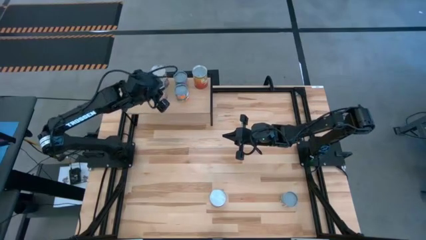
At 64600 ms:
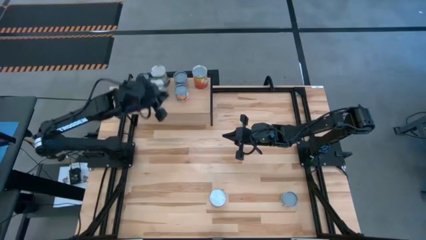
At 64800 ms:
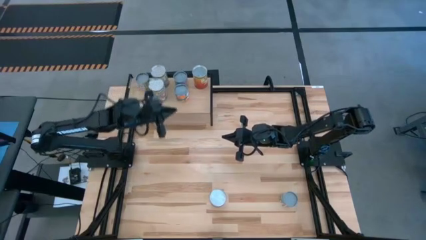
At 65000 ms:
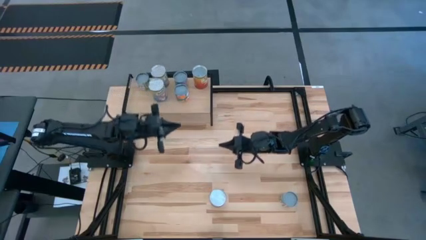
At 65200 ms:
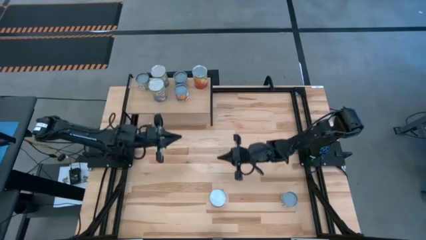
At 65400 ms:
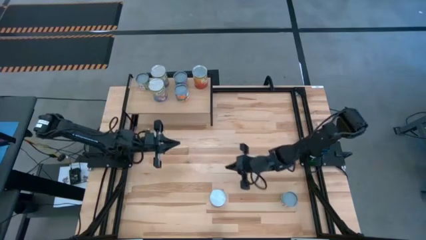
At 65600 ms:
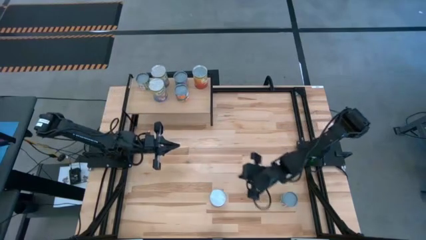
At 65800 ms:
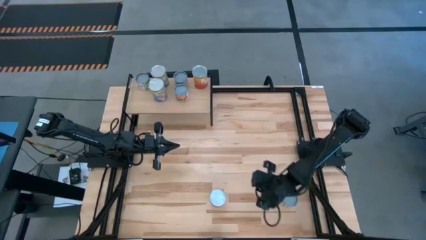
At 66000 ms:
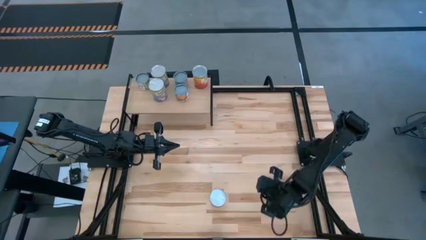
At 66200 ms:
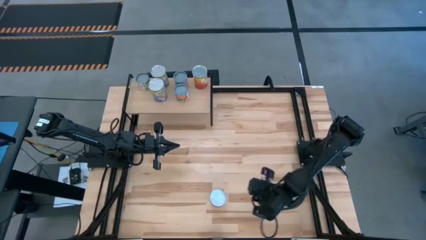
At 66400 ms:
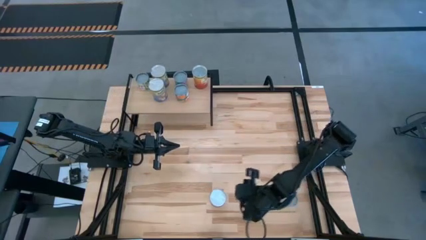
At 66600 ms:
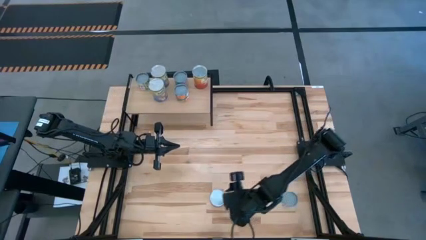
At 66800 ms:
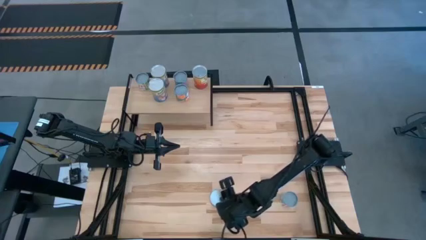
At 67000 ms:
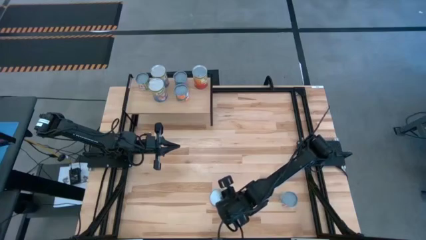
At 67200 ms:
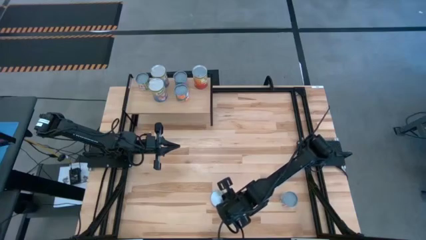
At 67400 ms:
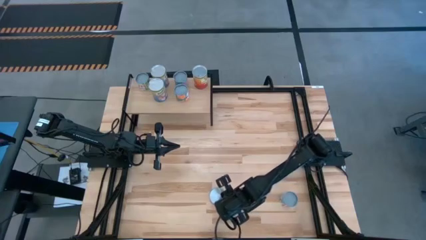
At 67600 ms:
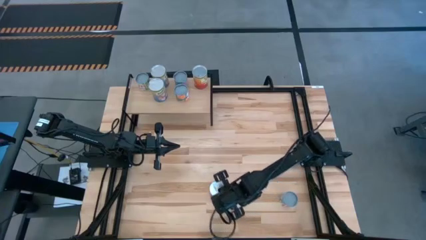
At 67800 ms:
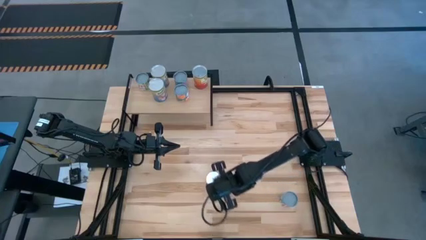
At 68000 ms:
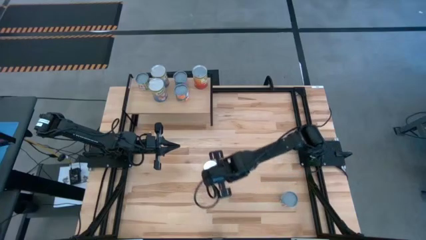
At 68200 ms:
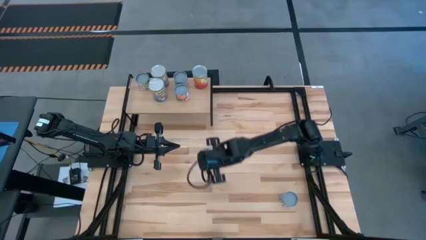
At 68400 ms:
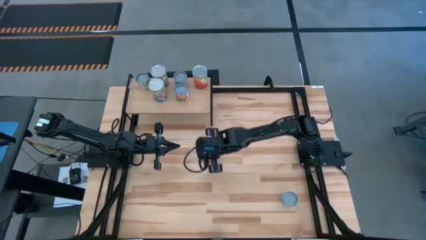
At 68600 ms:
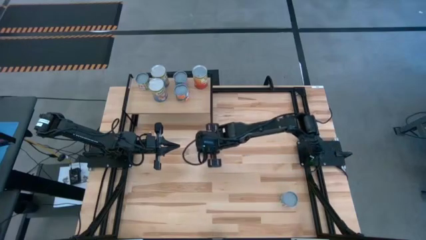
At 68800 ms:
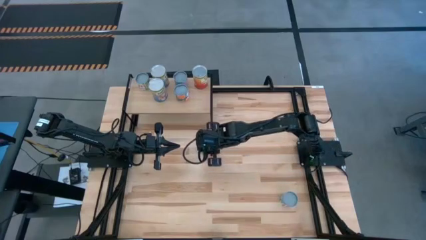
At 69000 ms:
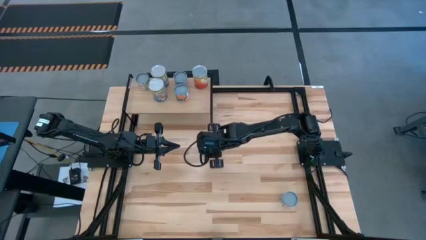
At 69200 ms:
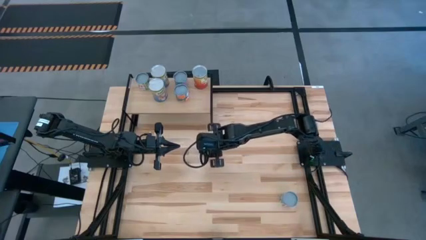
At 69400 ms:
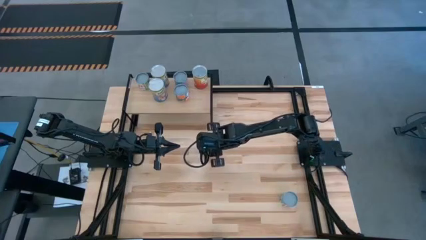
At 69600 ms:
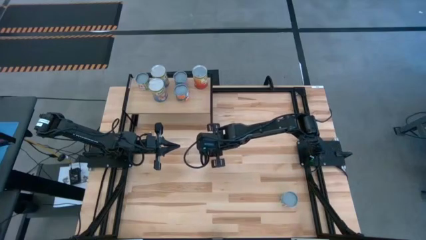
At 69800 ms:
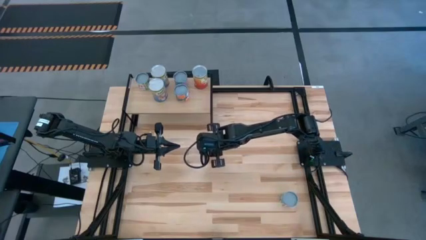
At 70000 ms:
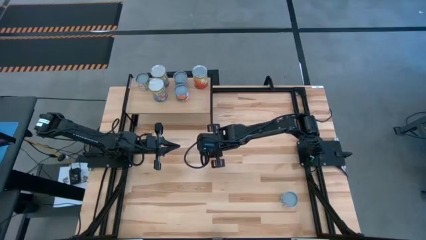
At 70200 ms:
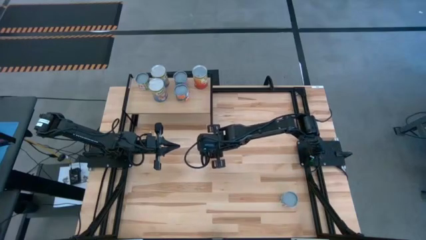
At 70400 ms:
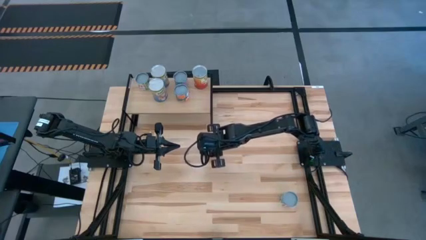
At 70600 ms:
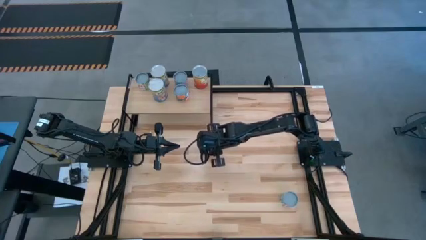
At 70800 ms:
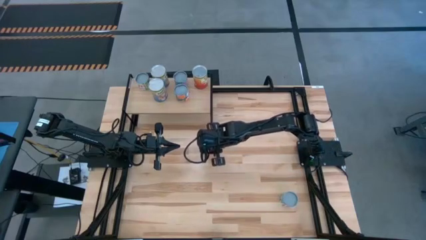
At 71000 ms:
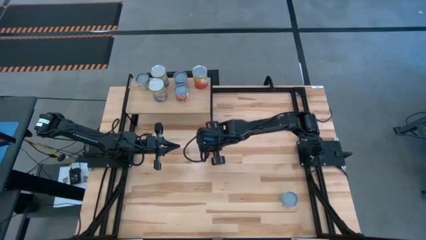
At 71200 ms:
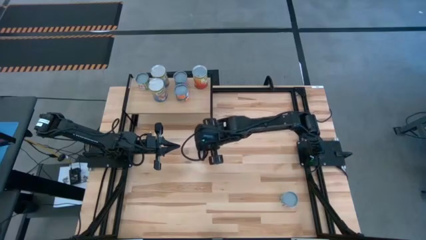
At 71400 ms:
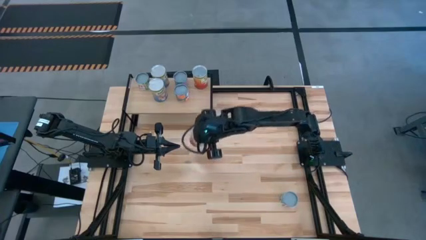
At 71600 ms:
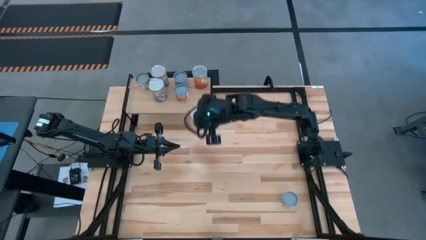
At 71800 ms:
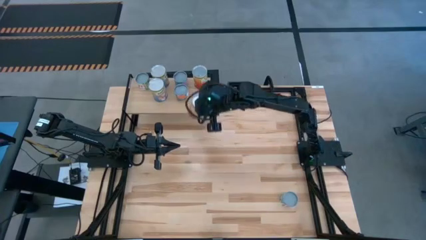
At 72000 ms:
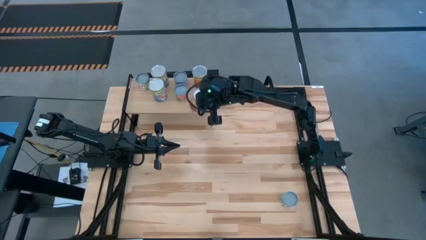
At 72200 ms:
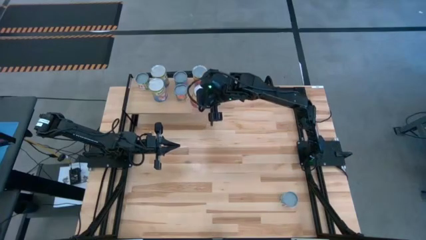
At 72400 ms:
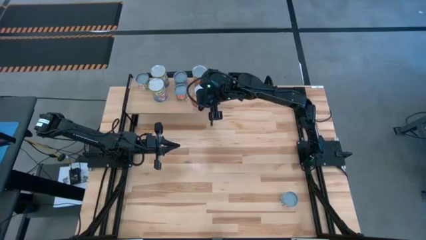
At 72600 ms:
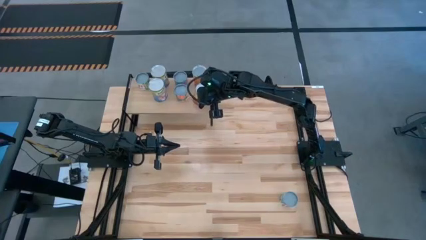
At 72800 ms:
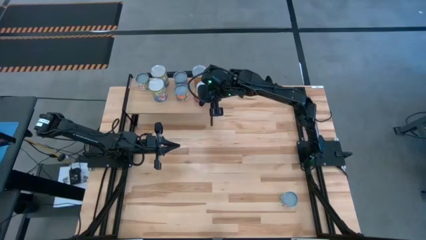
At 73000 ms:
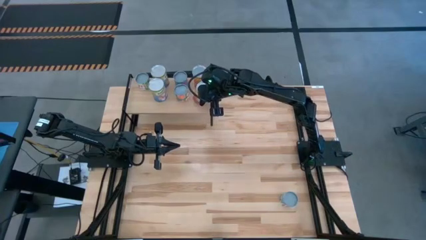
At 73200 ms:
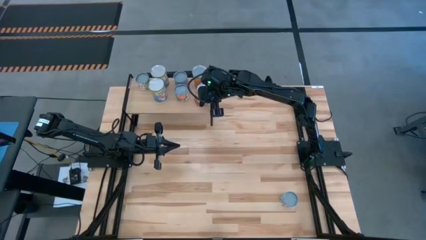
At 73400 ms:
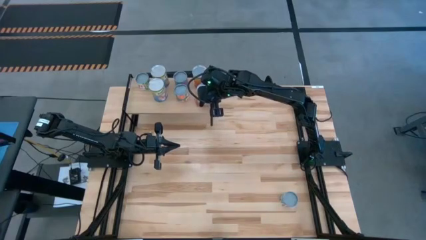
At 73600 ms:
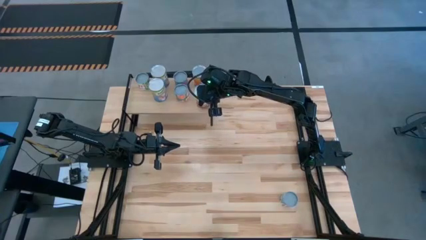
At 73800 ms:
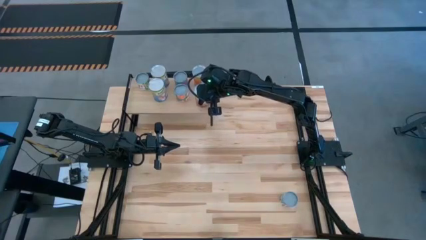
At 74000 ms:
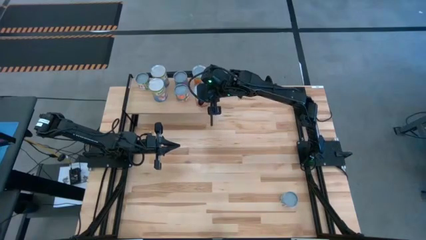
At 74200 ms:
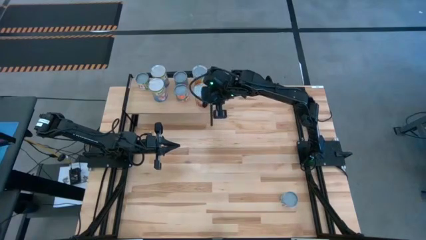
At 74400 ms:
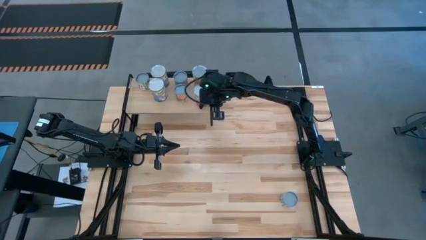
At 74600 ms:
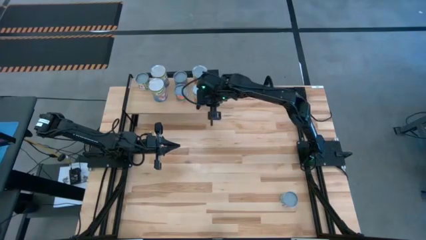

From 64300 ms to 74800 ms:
Task: Pick and place cans onto a shelf
Put the orange can on the shelf aligned with the other orange can

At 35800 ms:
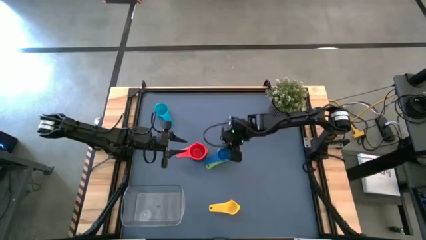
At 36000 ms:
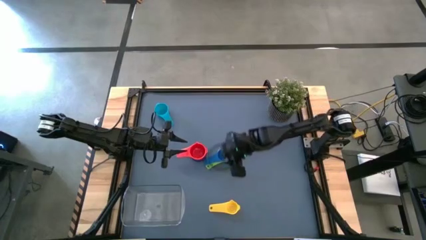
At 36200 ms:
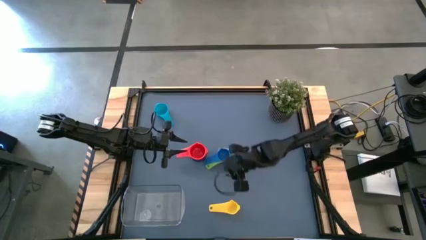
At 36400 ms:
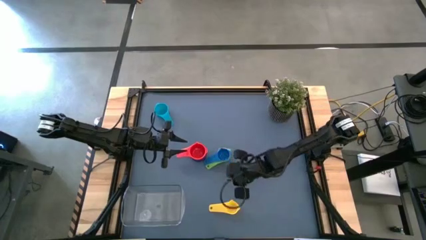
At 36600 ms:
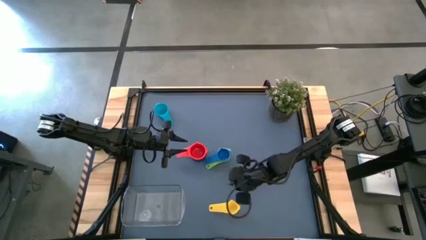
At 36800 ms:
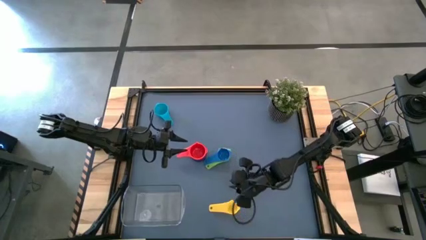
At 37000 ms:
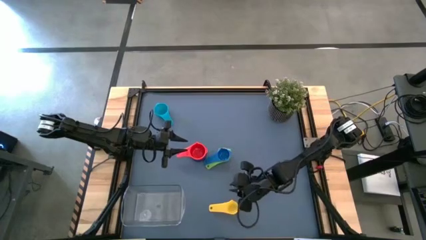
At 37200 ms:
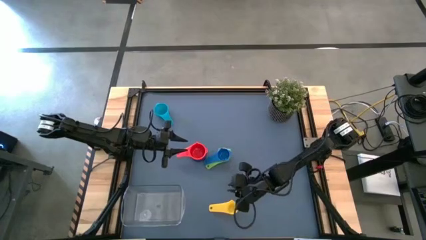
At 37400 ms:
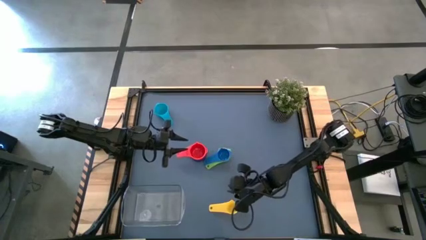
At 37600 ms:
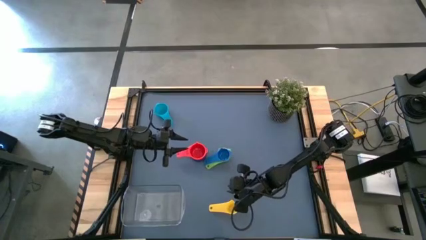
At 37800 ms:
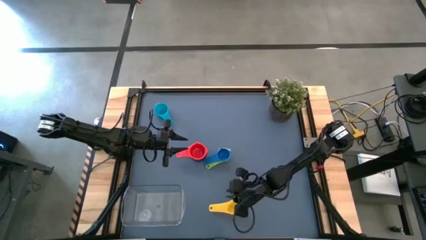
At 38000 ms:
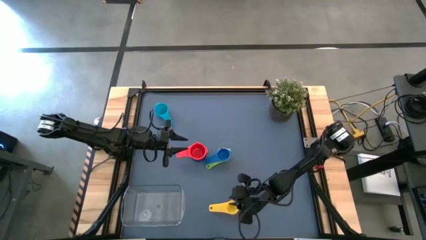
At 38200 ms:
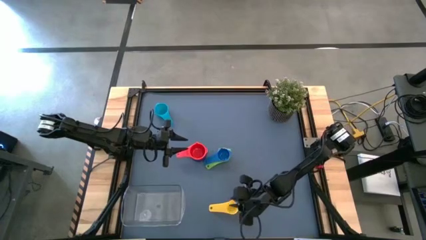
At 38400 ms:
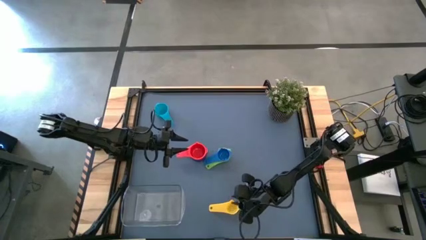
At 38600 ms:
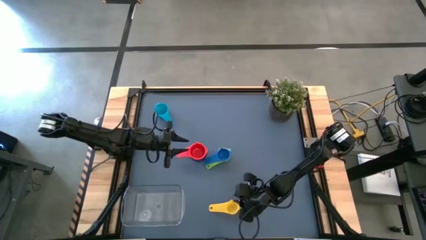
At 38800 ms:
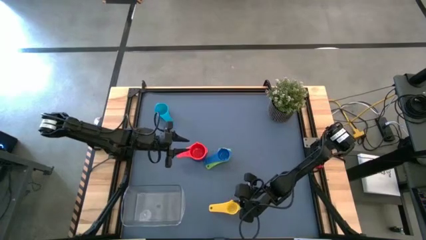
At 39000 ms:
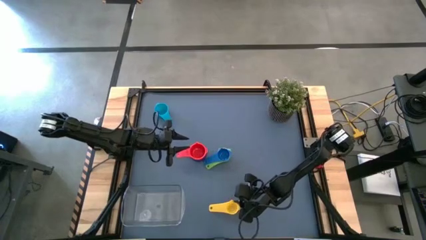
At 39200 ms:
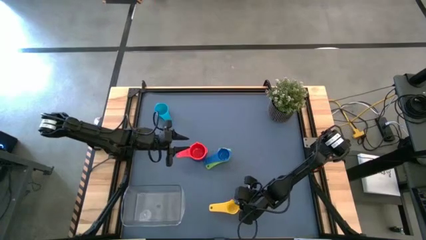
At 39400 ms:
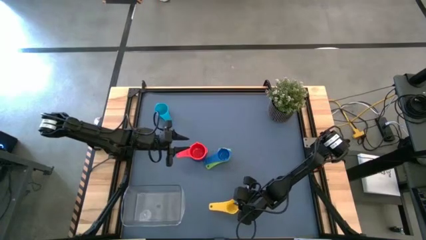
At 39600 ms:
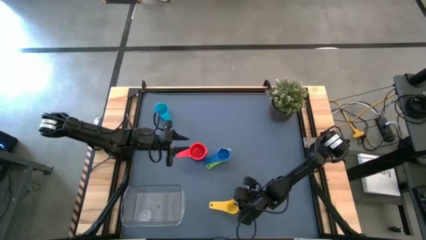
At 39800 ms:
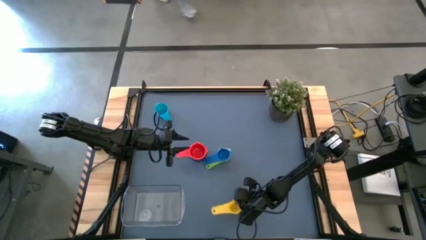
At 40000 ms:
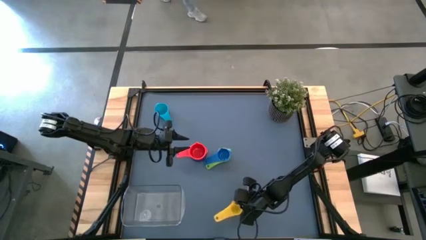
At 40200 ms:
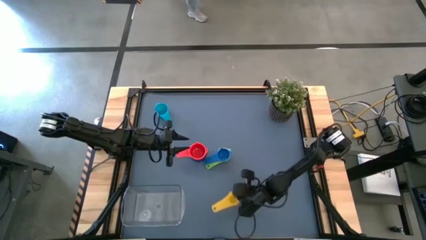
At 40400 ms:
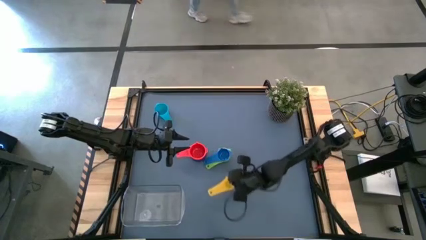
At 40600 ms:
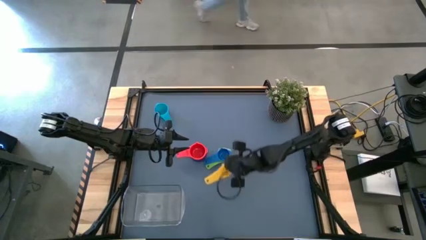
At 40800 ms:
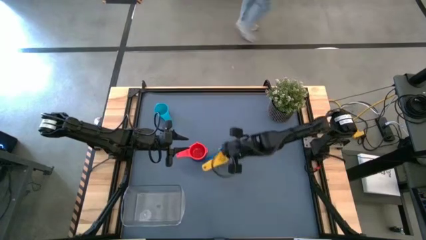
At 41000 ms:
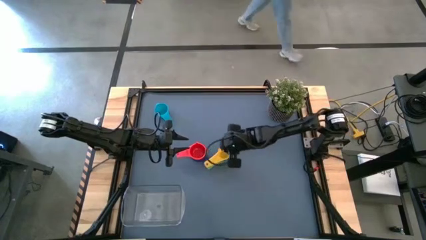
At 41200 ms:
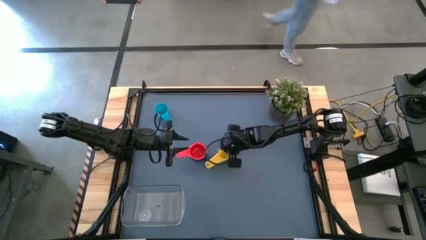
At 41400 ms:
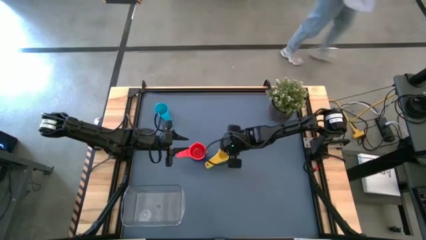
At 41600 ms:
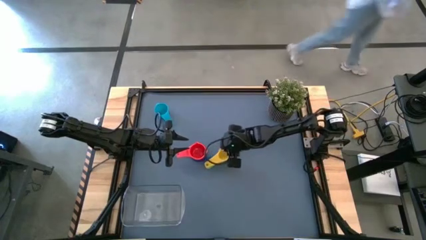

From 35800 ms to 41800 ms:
Task: Nest measuring cups in basket
Stack the yellow measuring cup on top of the blue measuring cup
